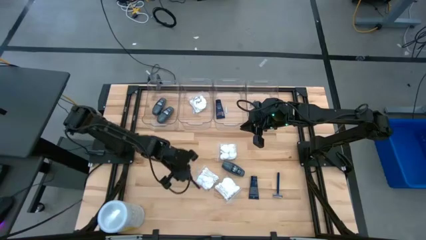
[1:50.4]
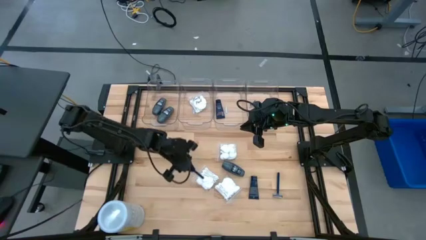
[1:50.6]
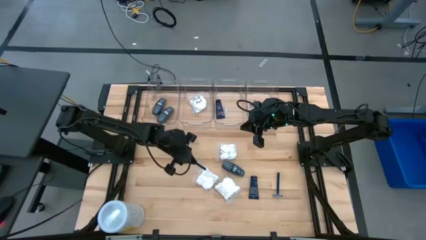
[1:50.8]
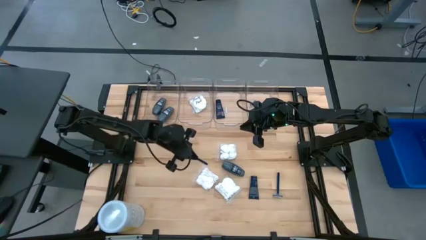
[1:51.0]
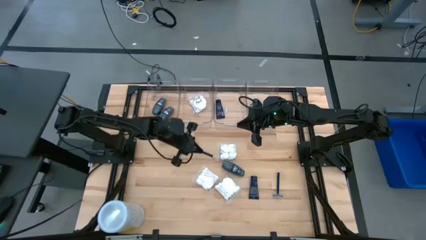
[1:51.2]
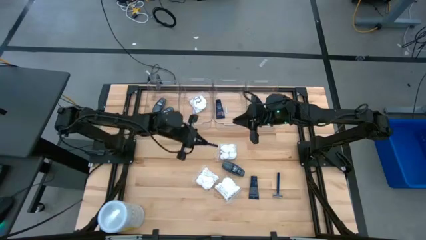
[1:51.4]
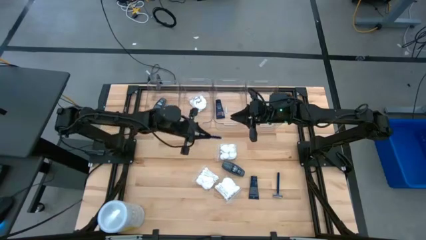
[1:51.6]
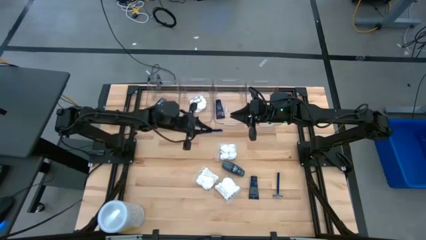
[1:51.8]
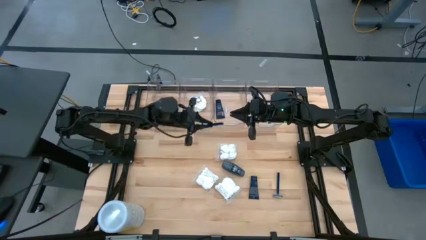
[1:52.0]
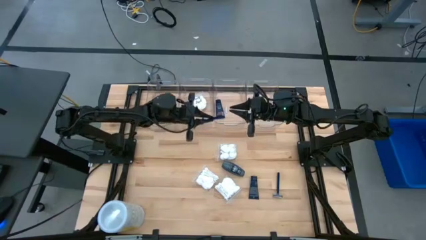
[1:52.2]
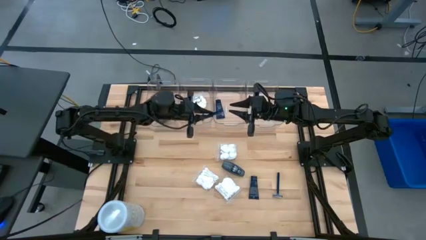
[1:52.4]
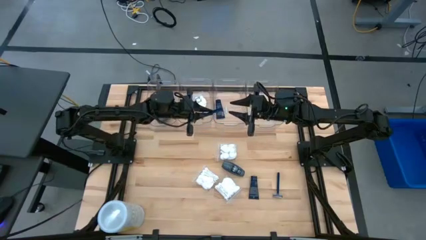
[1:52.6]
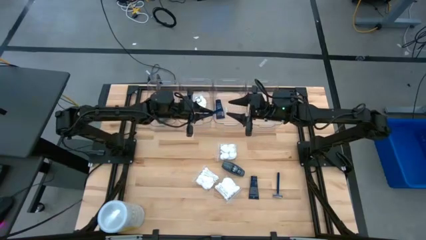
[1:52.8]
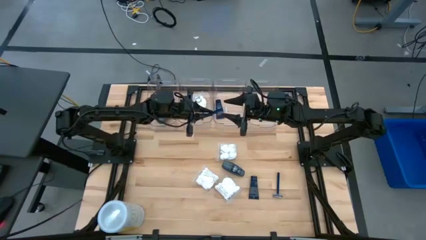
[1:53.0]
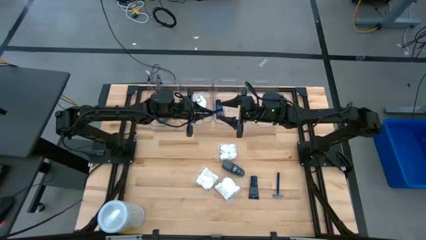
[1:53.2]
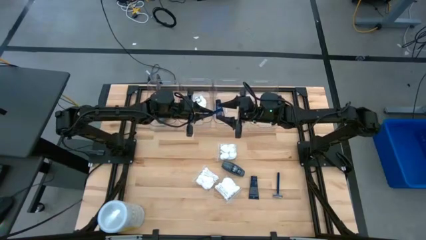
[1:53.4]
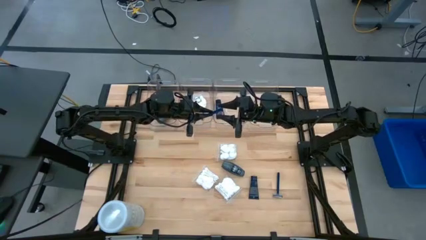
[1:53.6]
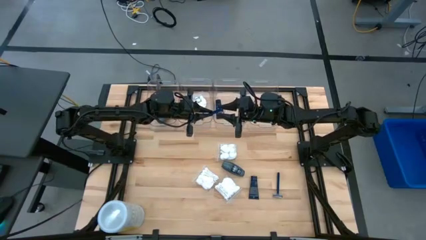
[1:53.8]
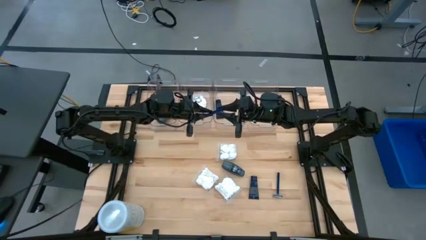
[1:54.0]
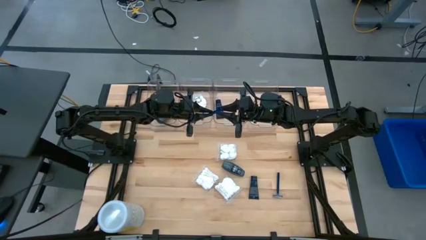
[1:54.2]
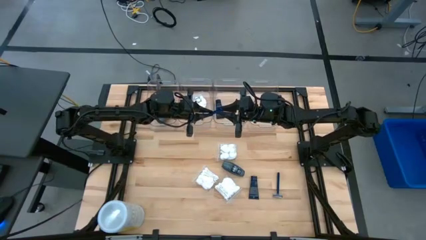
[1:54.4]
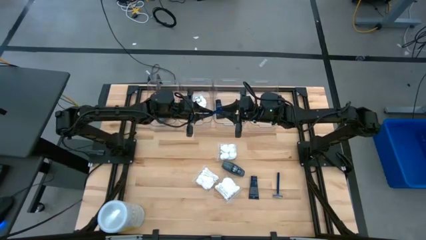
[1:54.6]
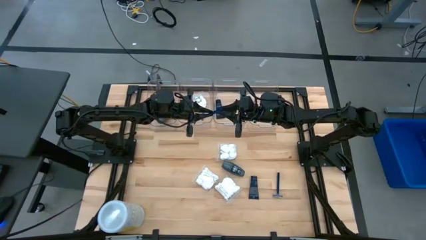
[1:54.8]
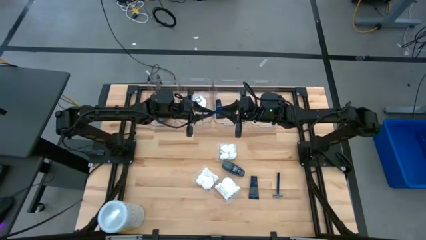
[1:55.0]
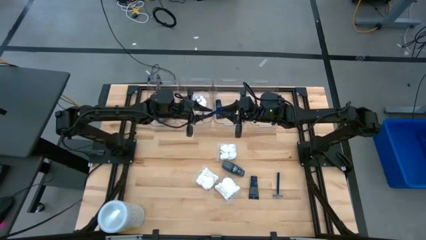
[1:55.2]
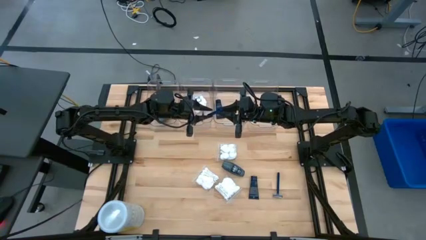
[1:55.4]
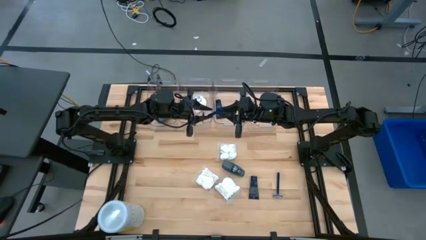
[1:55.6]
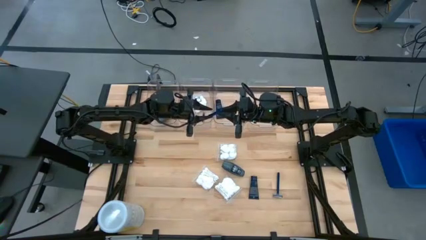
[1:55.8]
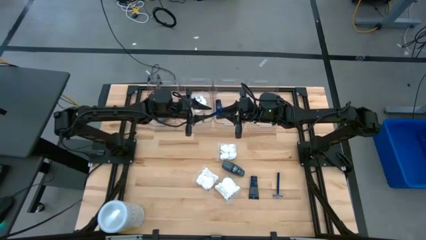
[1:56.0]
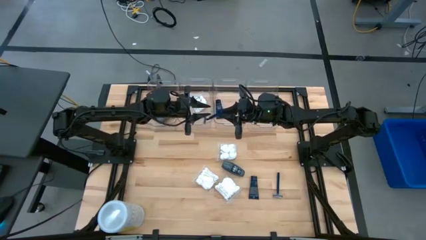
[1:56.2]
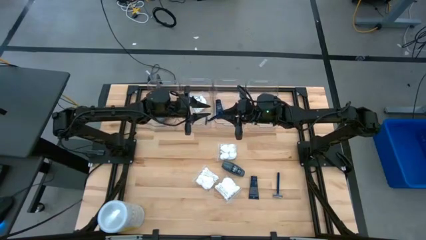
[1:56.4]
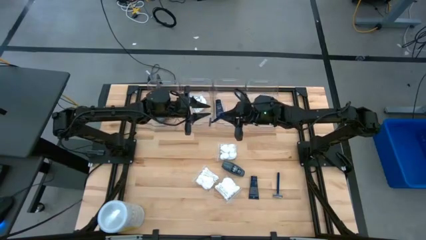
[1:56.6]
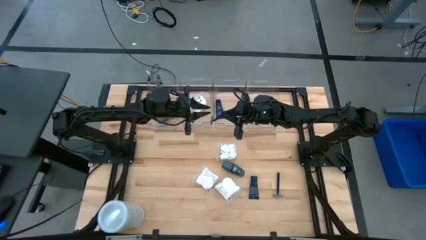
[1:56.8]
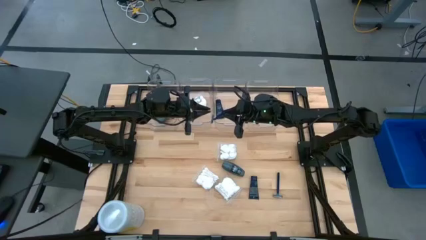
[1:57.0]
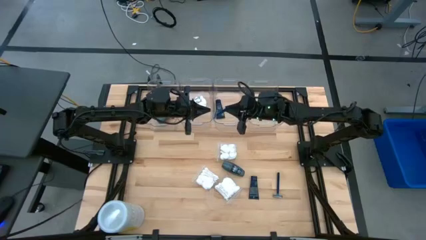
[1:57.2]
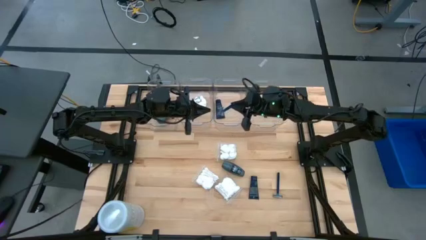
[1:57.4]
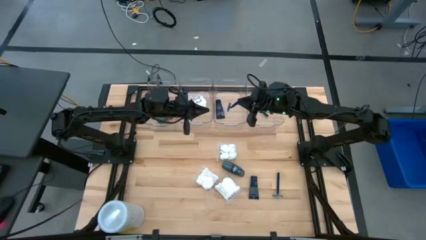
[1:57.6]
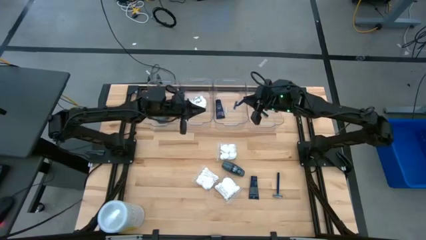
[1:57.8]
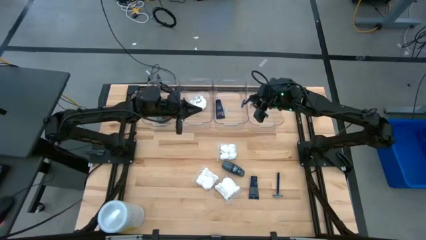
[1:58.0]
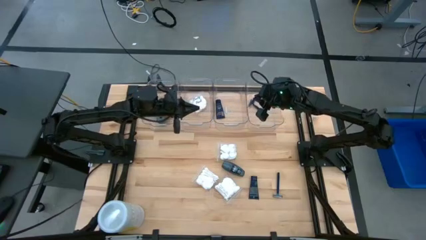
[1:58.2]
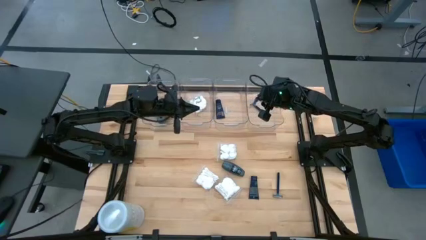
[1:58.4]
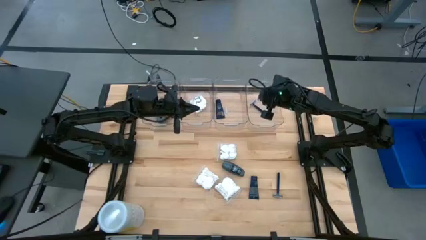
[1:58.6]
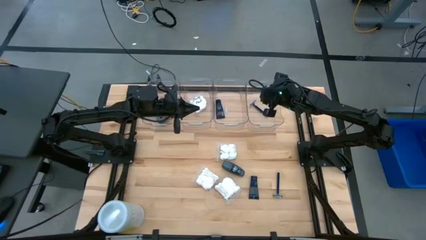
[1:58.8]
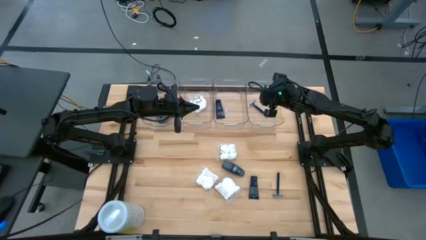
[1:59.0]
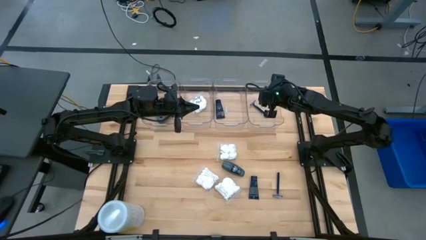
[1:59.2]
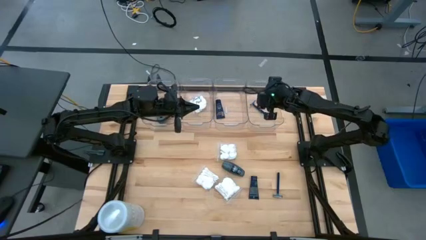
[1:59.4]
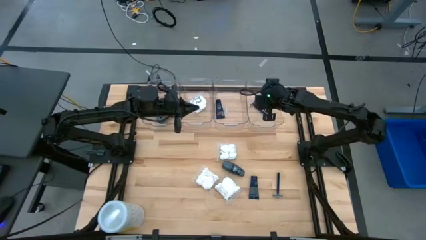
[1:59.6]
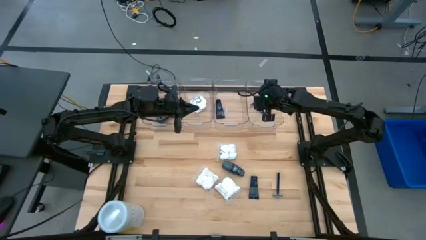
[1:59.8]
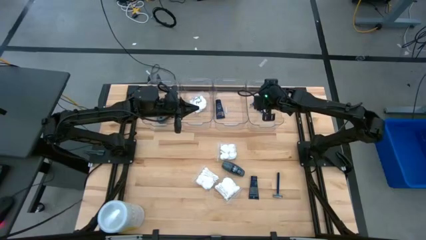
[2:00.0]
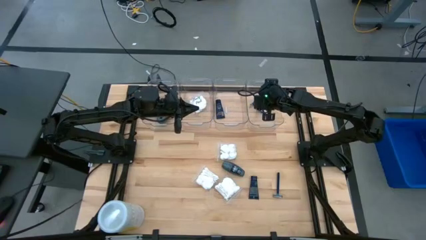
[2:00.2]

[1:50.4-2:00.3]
Task: Pick & Place Travel size toiletries
Put the left blue razor into the right transparent bin

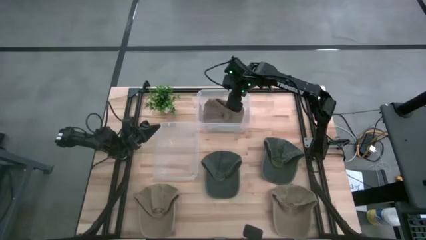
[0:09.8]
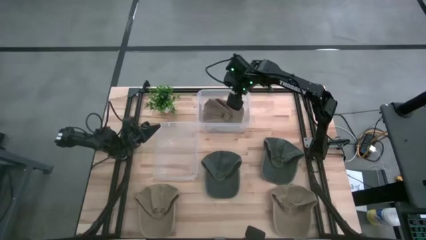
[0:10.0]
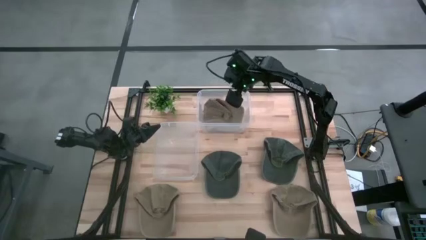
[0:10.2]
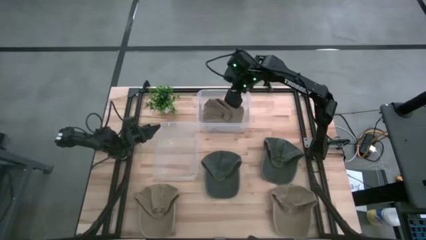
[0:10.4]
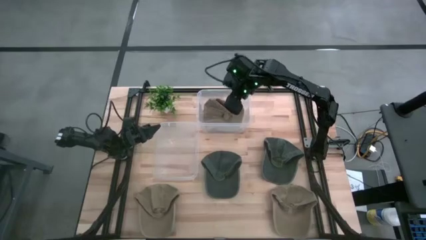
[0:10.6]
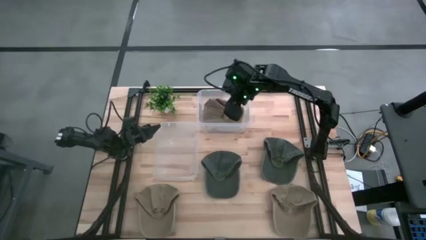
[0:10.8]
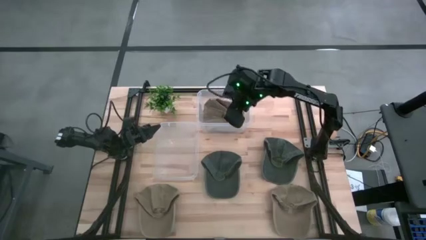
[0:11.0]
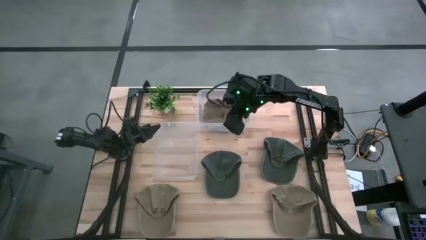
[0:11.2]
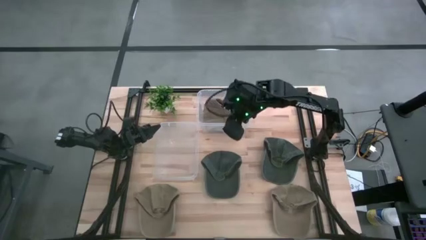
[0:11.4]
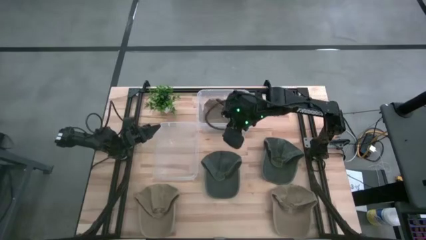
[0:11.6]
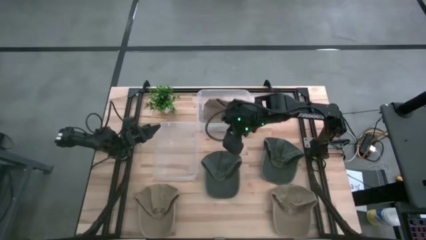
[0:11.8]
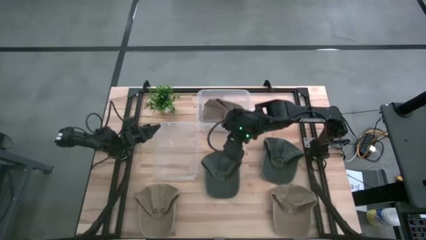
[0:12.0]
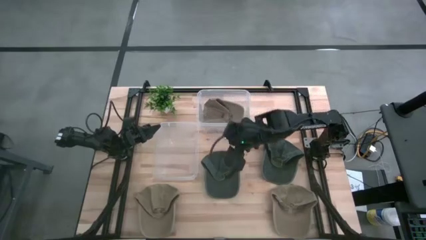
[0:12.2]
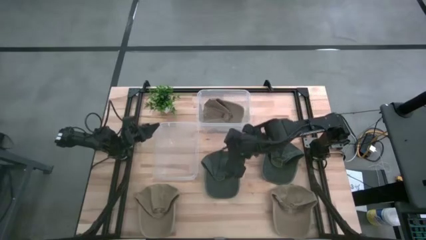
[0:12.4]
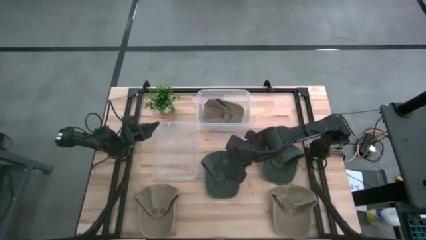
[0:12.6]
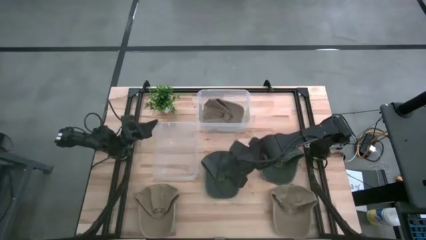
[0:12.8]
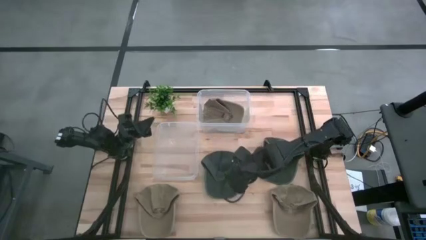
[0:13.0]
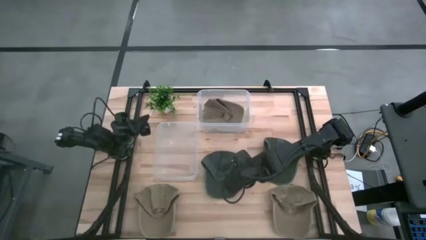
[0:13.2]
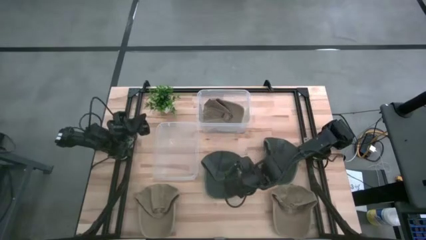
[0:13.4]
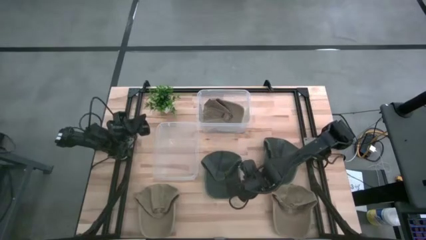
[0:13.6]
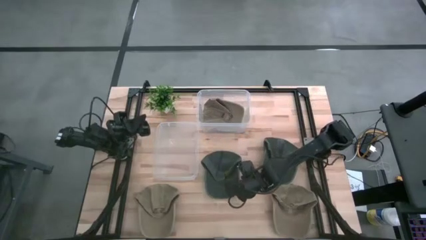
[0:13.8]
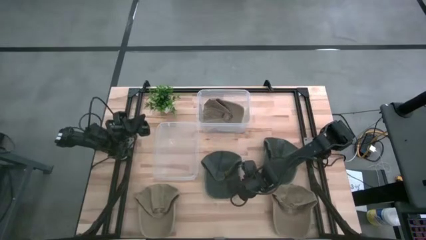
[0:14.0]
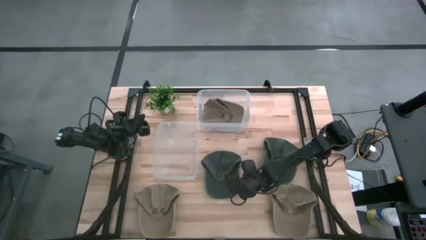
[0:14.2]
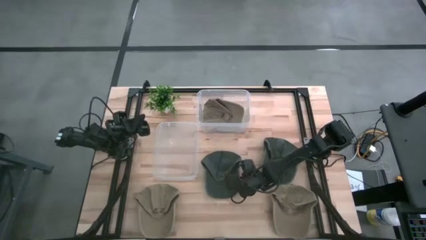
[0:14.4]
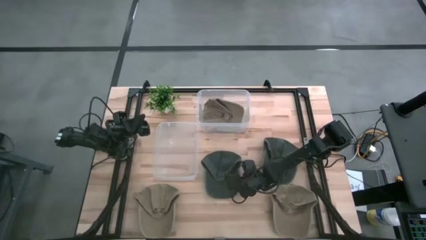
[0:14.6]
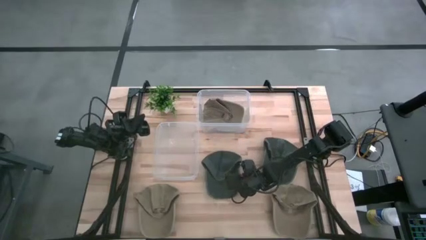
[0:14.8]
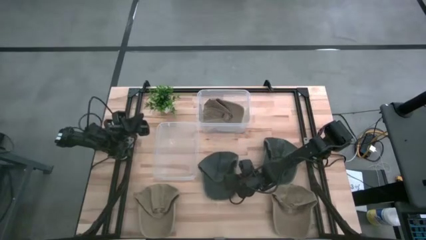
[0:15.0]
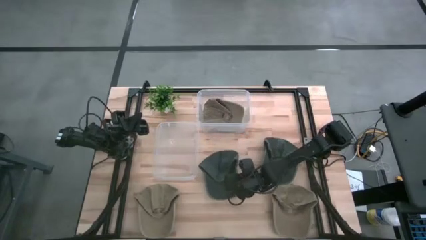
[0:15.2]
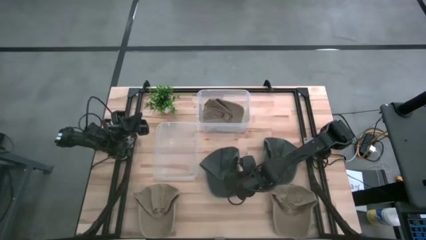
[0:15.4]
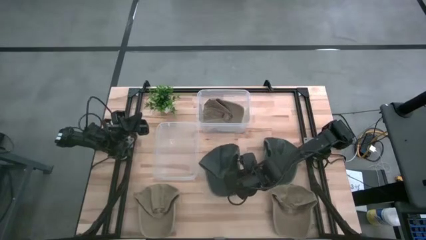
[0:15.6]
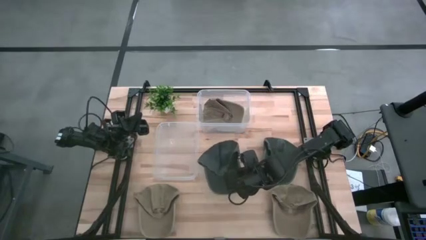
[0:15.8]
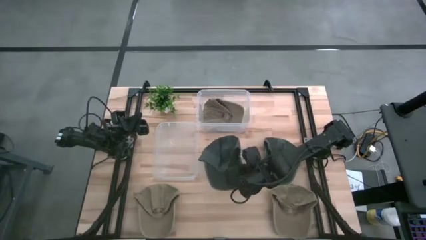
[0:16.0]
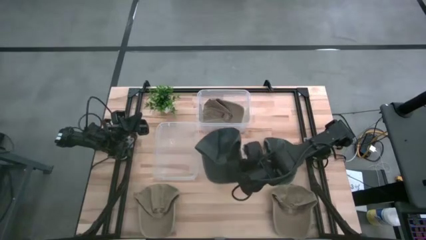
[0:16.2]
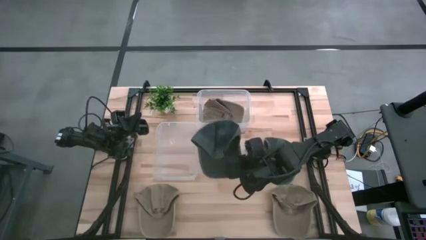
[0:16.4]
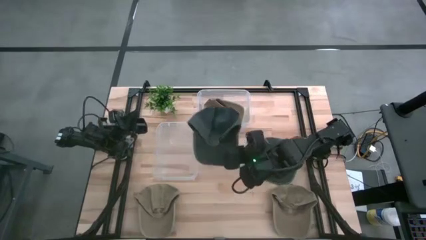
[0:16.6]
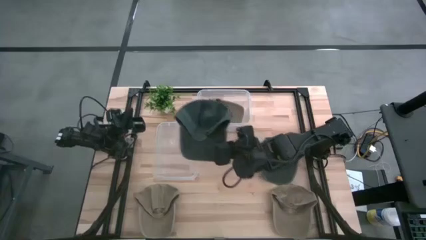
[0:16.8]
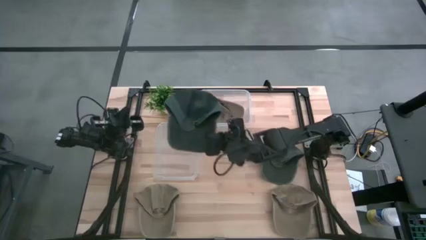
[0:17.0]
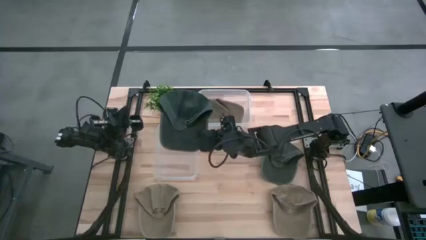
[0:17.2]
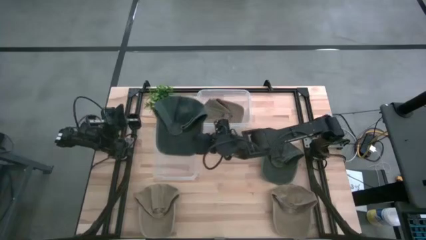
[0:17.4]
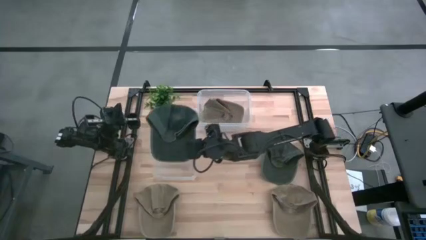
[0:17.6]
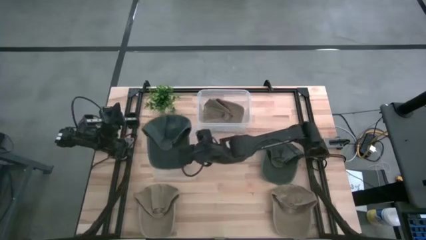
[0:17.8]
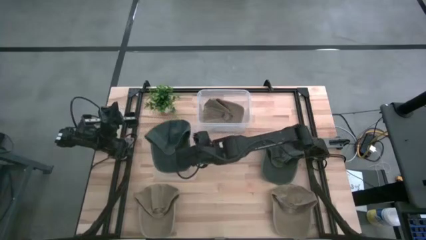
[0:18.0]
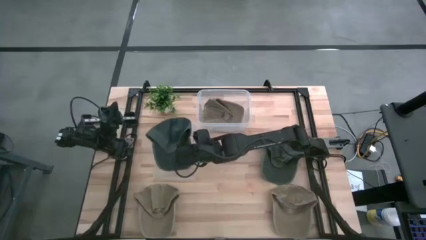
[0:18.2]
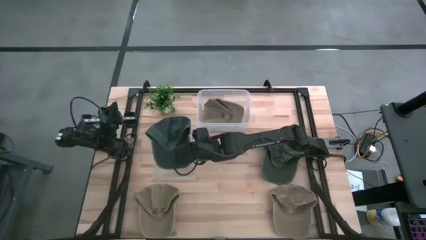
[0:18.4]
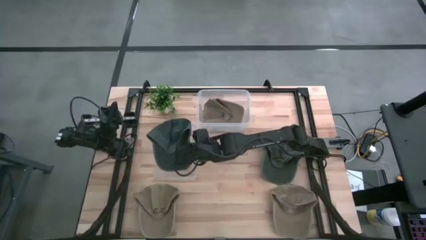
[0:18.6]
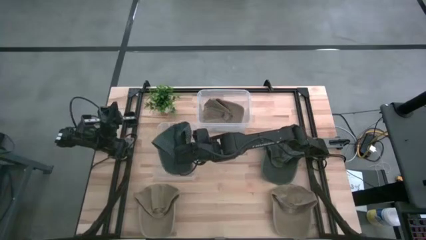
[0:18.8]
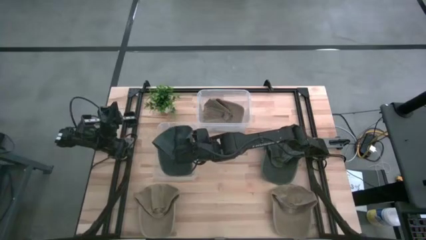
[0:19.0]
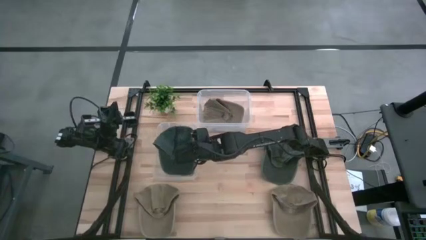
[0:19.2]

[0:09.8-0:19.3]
Task: Pick & Place hat
Put the left blue cap into the bottom transparent bin
